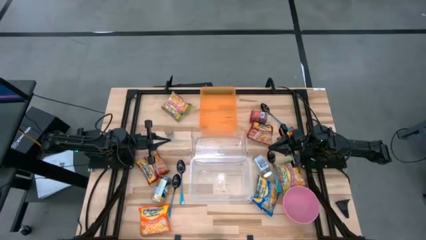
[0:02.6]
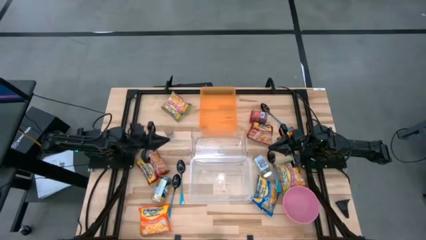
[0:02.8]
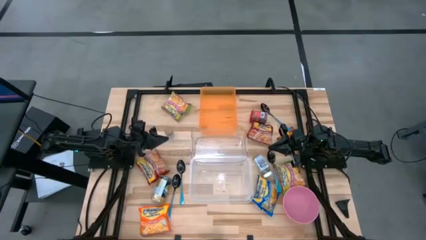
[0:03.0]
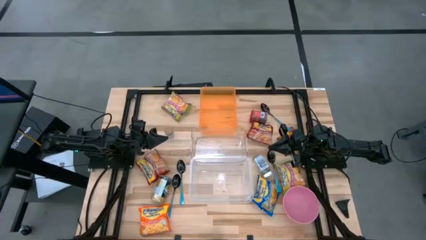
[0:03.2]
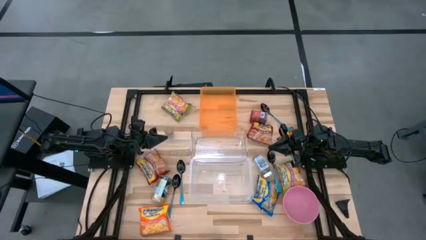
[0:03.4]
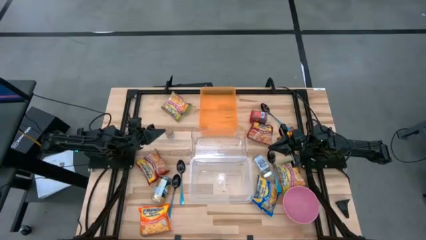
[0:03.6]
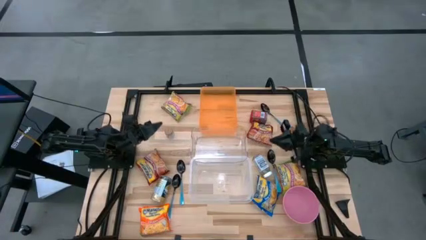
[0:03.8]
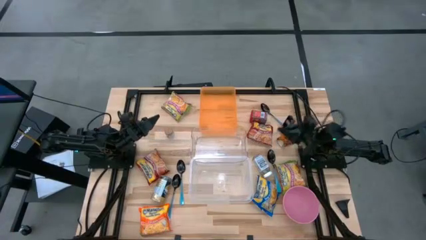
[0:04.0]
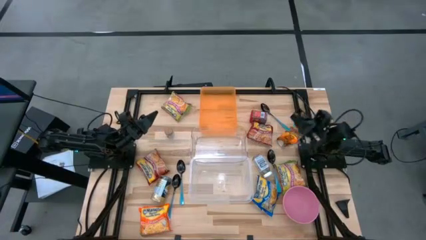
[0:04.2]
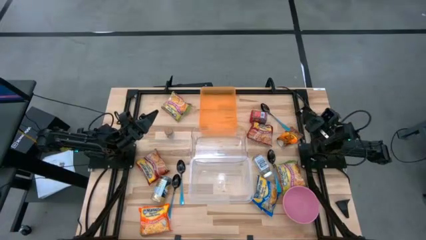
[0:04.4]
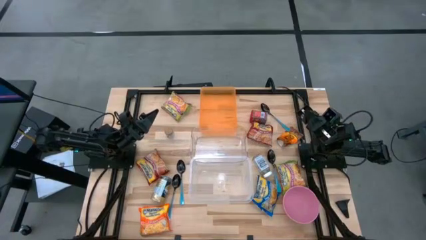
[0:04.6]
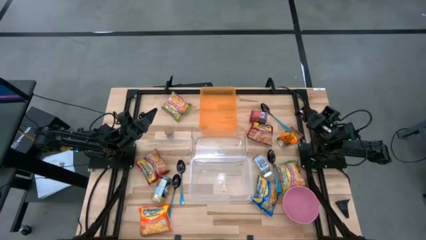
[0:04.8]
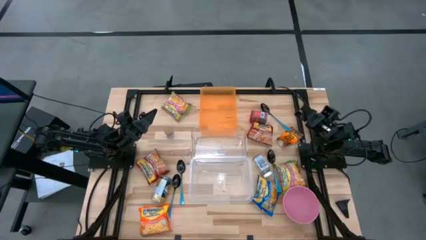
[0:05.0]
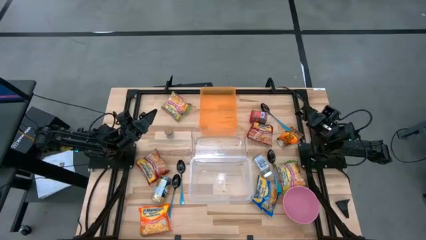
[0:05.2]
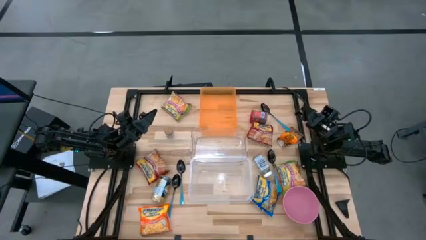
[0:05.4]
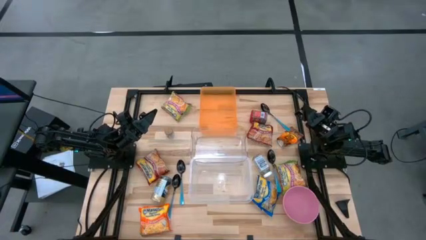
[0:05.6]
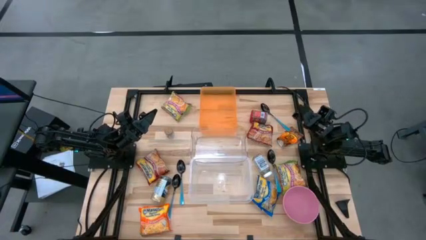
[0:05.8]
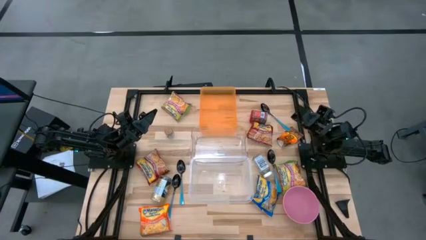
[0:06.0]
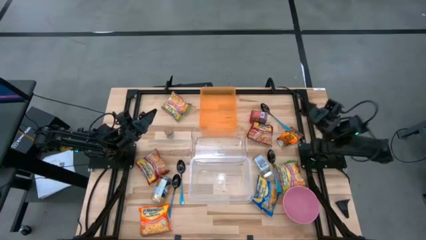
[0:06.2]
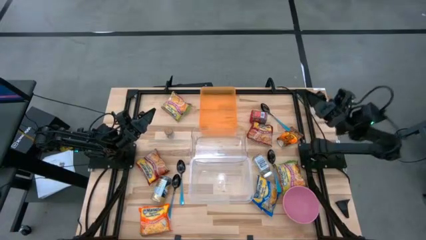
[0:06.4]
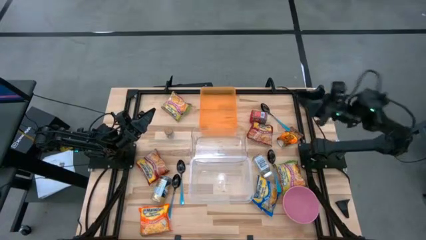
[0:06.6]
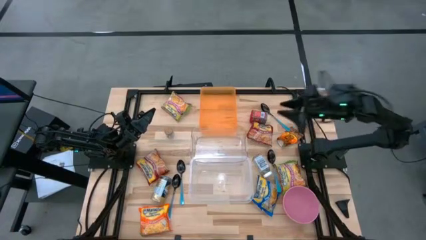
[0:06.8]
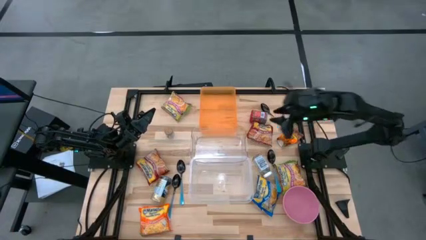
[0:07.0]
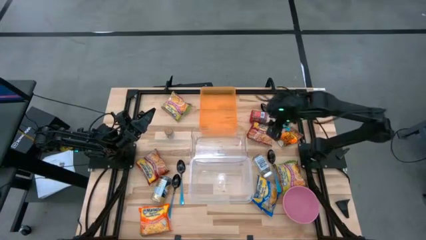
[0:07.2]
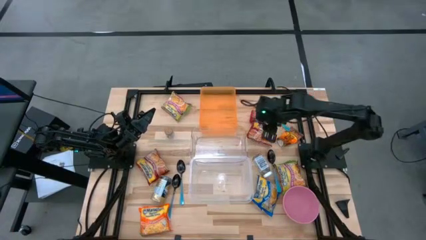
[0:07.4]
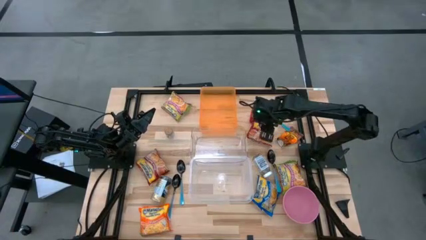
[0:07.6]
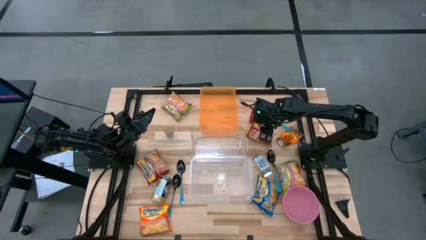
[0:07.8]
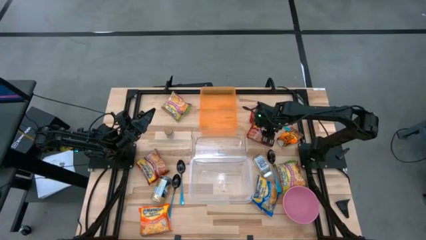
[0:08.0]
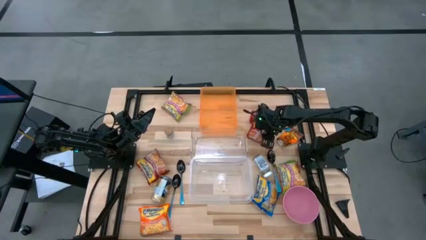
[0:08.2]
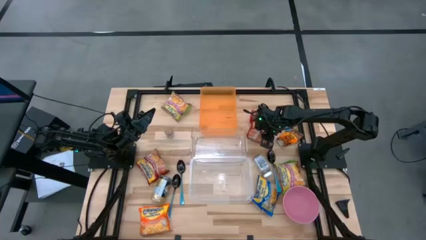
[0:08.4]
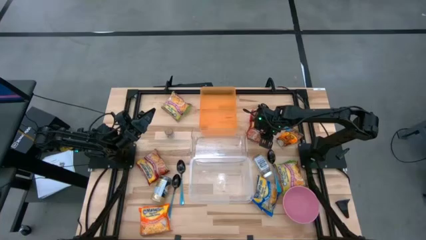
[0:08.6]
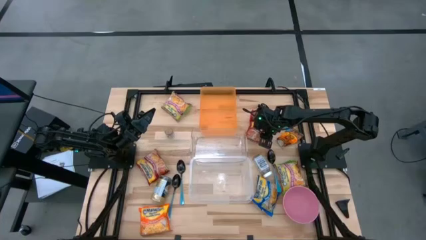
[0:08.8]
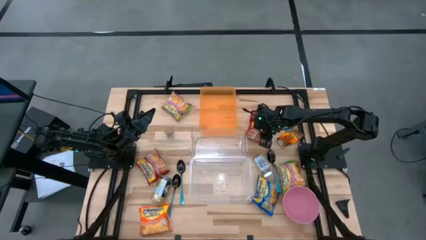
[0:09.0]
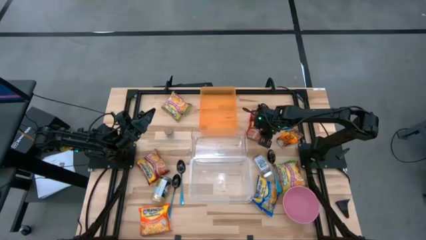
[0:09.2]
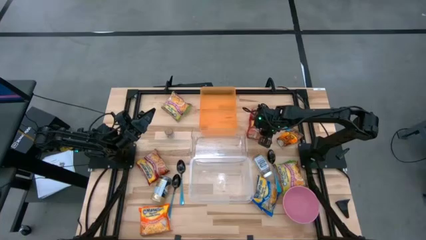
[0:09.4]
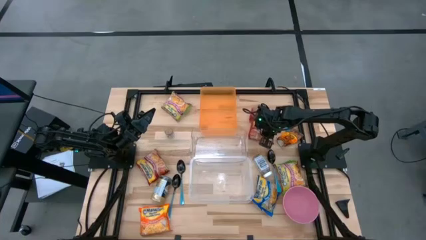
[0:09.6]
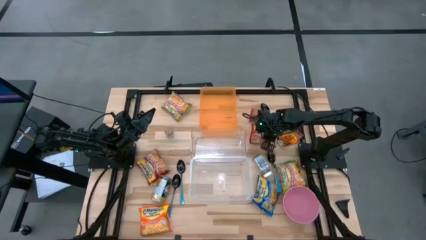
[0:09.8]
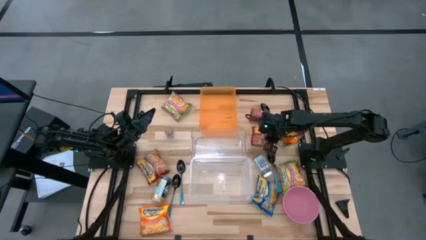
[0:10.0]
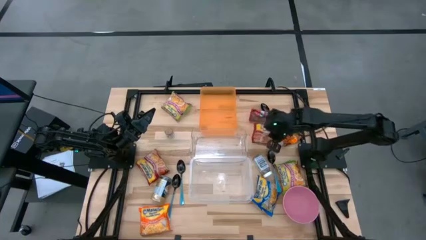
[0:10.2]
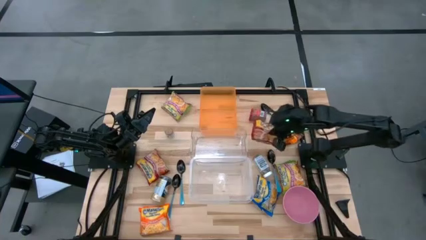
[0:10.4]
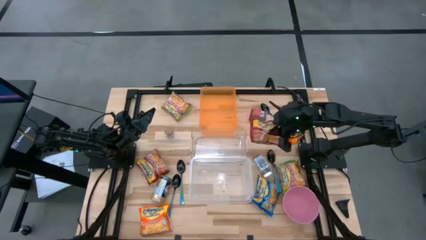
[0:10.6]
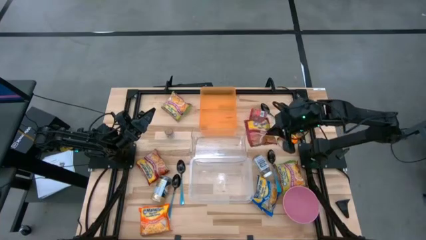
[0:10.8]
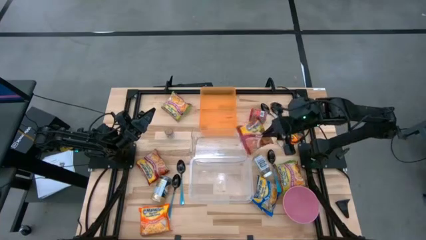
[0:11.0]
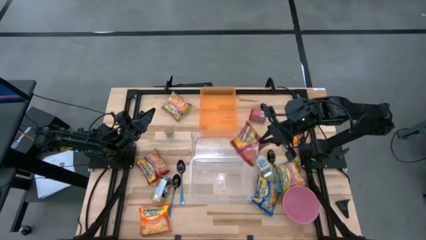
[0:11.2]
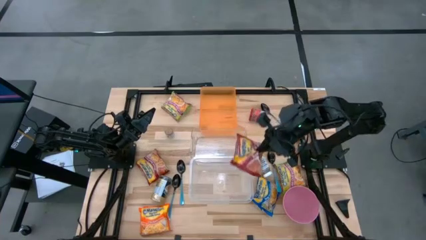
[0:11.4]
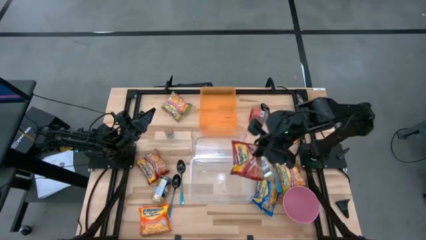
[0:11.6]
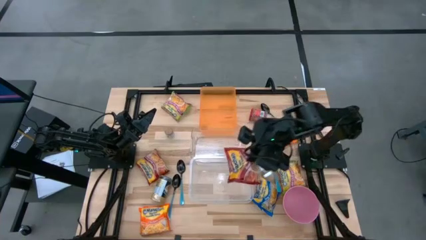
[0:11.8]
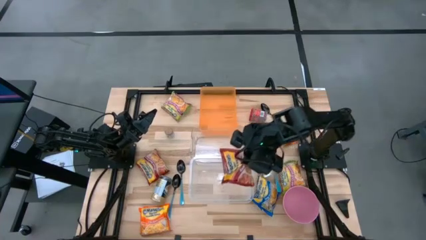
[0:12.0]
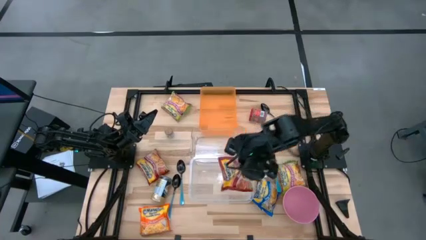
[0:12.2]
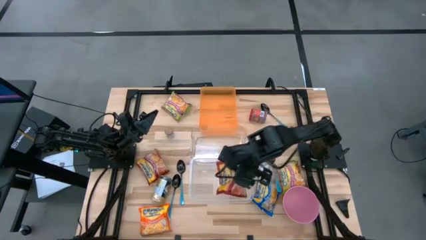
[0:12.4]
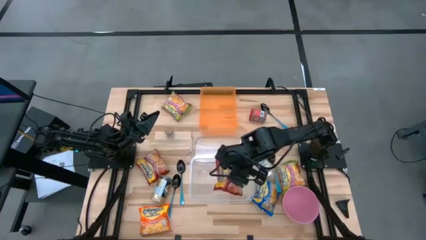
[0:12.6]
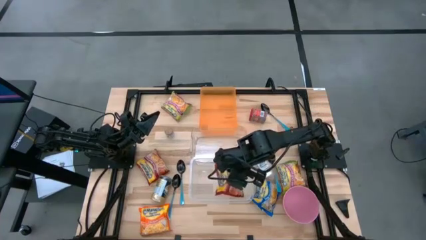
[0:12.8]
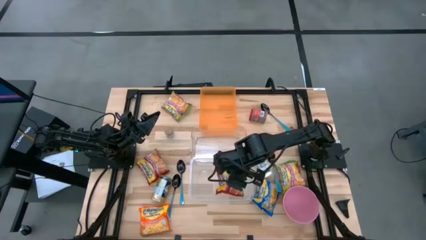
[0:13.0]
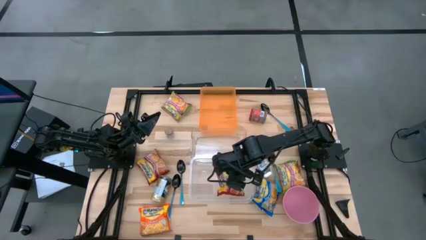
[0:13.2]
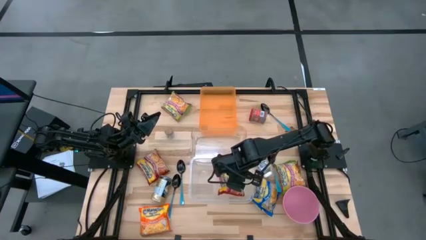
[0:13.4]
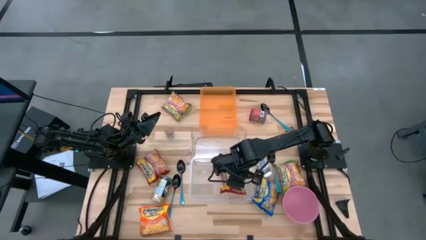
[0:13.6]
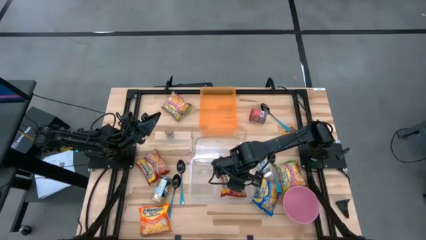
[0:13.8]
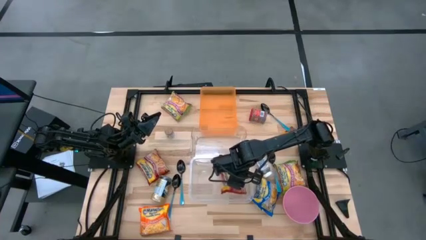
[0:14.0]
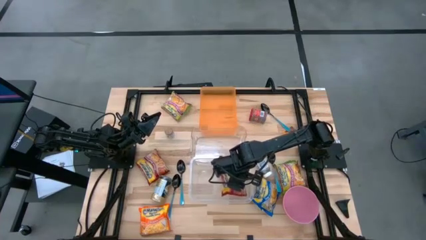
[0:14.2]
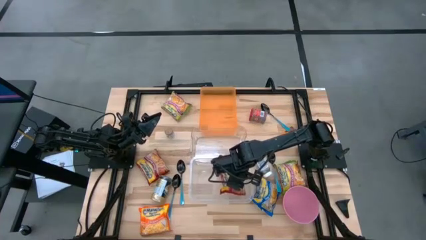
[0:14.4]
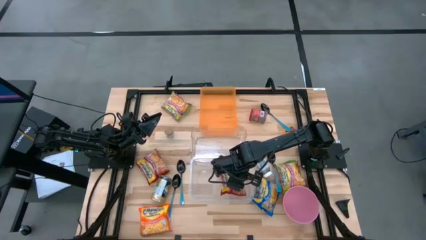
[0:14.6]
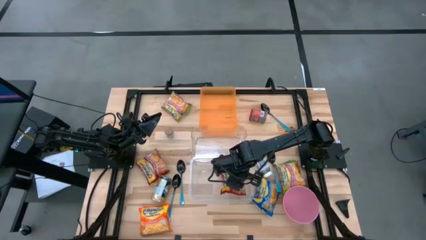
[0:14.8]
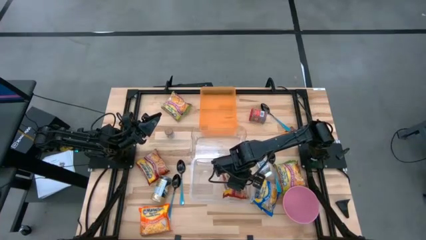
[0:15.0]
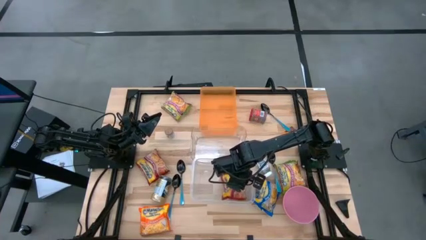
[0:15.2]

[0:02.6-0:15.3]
Task: Pick & Place Food Item
Put the red noodle pack into the white transparent bin

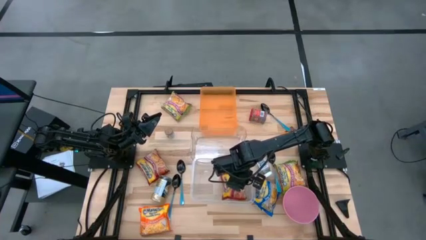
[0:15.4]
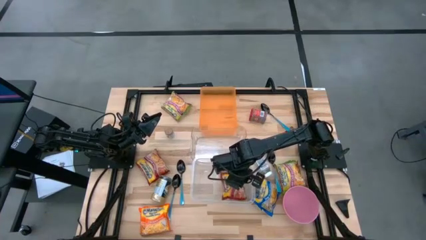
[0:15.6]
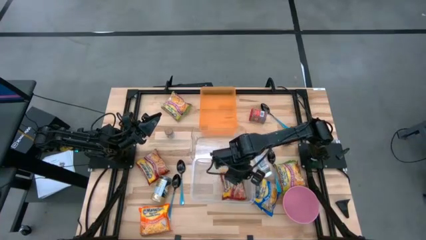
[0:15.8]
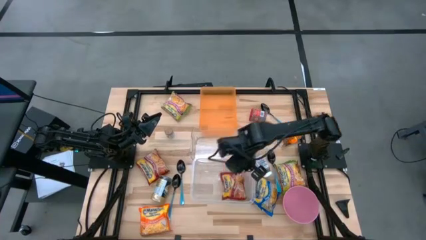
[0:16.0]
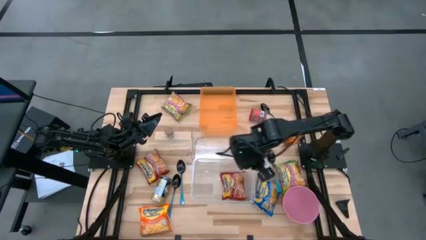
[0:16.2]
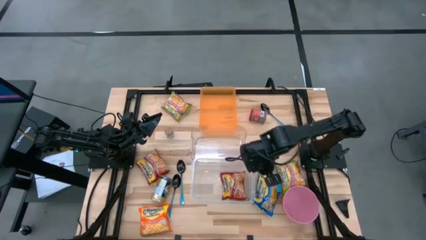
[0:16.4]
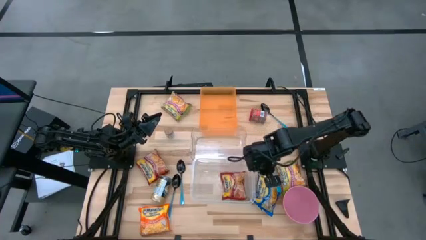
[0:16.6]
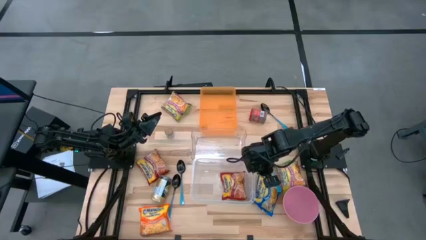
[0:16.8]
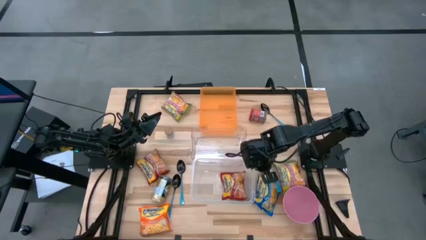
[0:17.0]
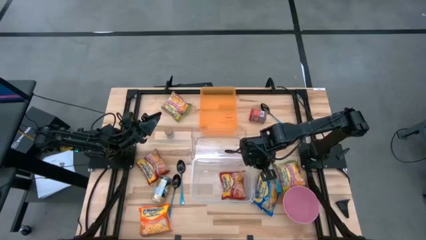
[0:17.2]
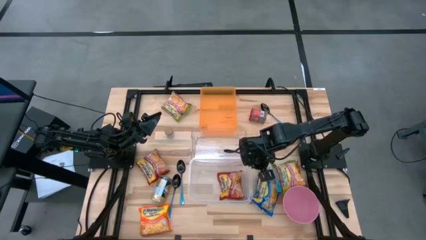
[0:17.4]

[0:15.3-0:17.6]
Adjust the white transparent bin on the table
